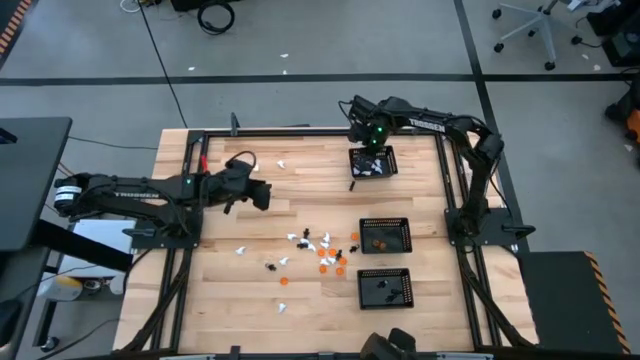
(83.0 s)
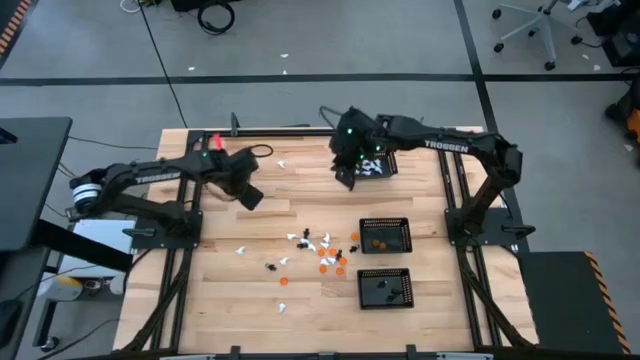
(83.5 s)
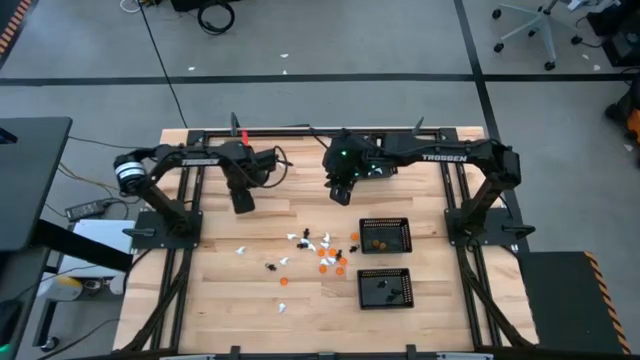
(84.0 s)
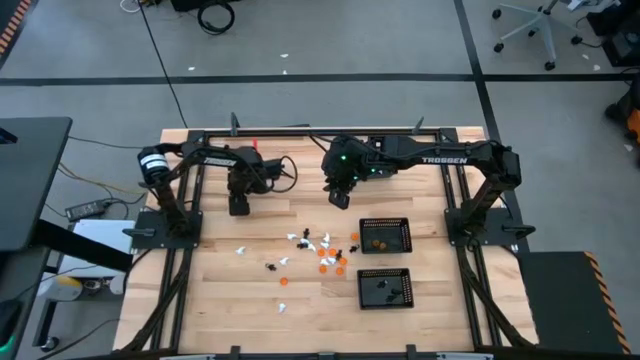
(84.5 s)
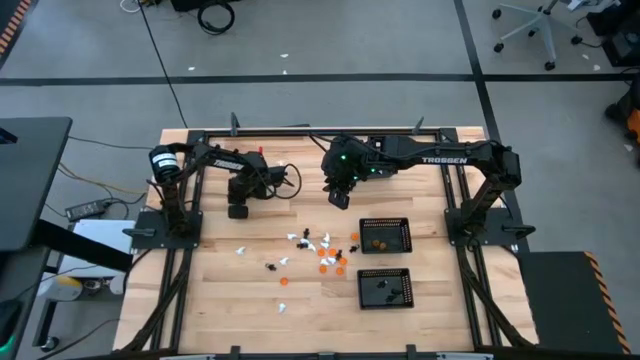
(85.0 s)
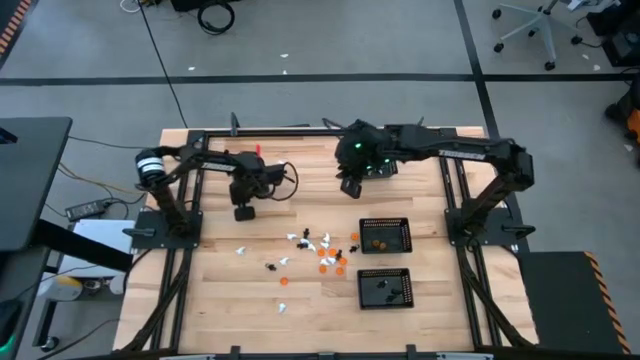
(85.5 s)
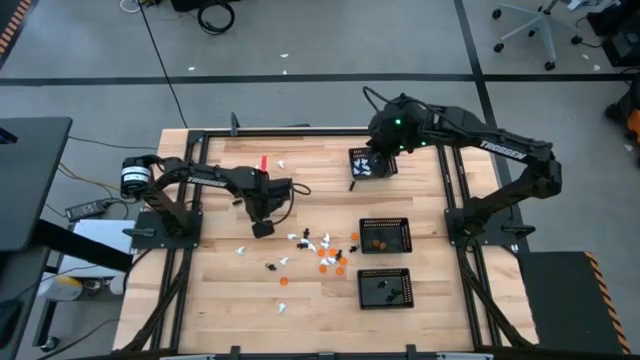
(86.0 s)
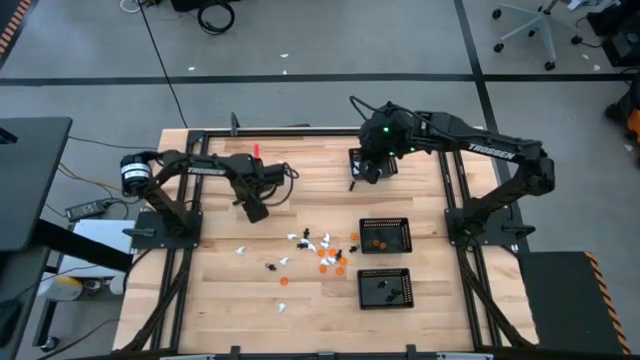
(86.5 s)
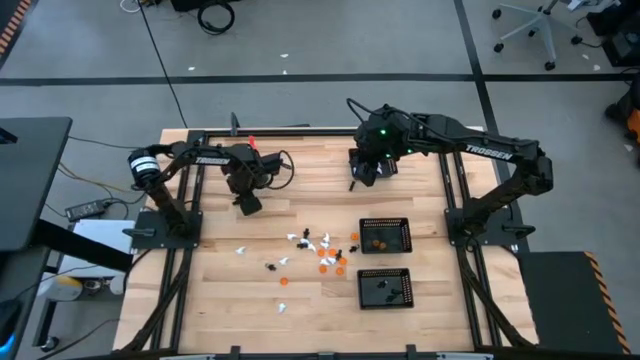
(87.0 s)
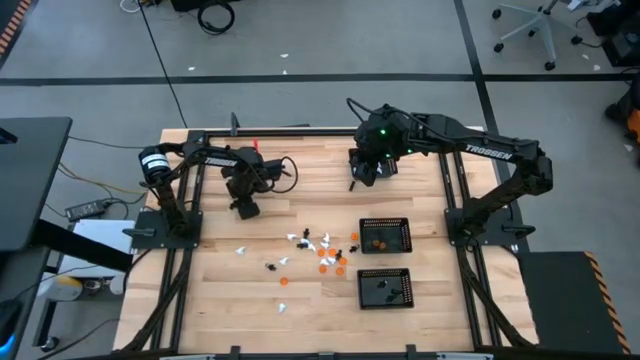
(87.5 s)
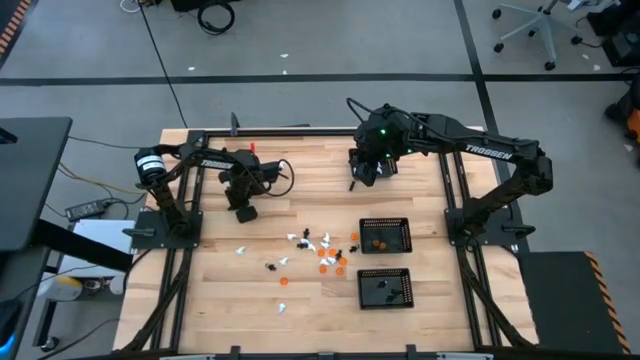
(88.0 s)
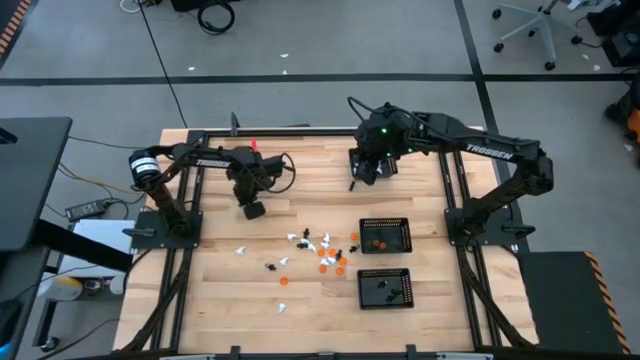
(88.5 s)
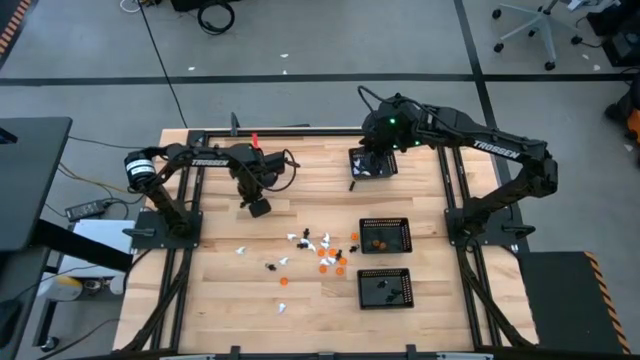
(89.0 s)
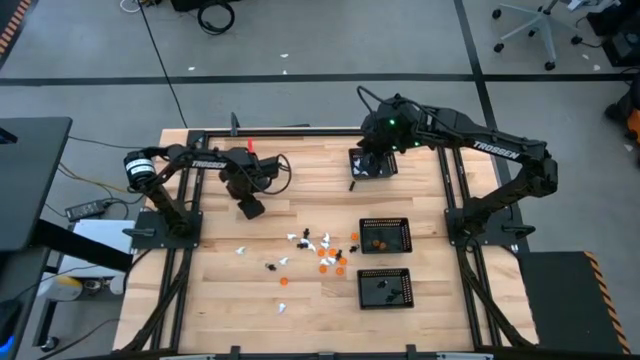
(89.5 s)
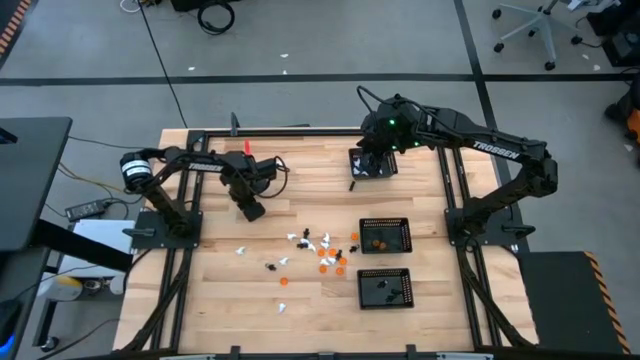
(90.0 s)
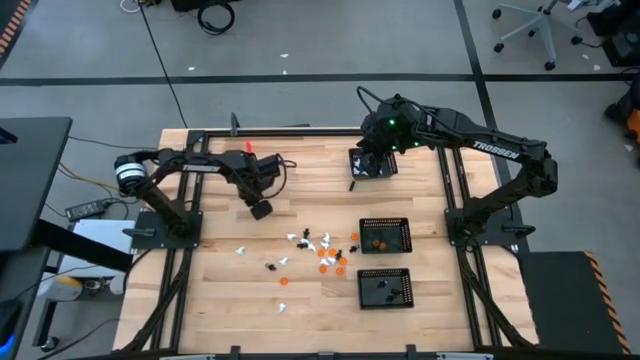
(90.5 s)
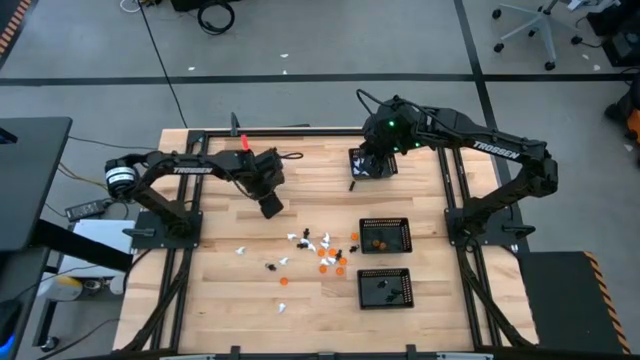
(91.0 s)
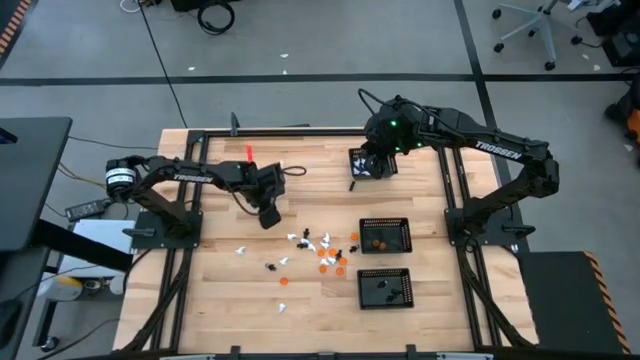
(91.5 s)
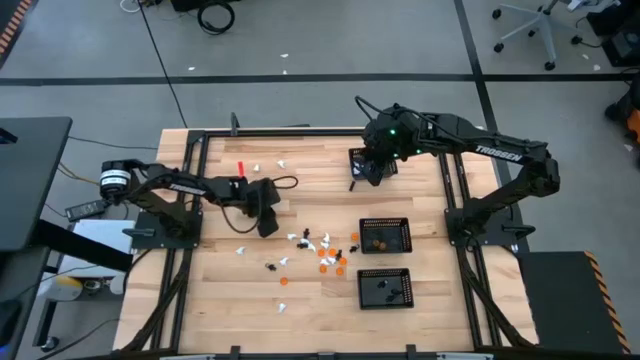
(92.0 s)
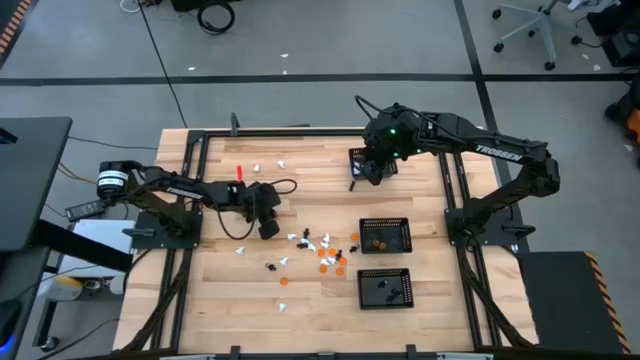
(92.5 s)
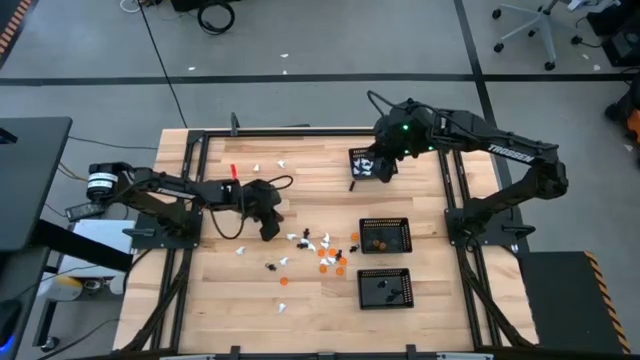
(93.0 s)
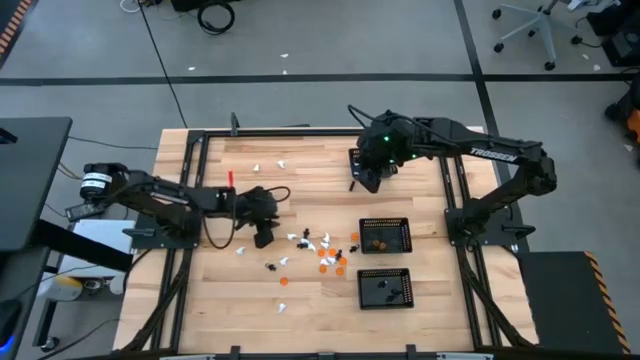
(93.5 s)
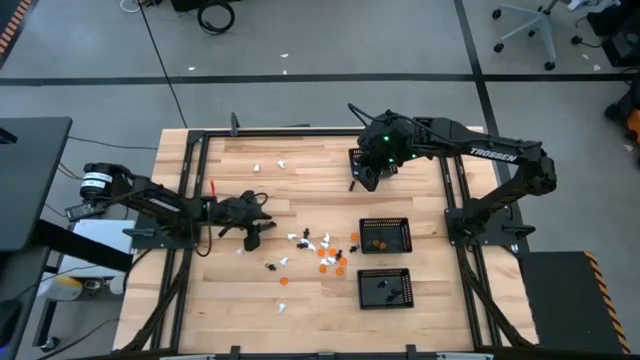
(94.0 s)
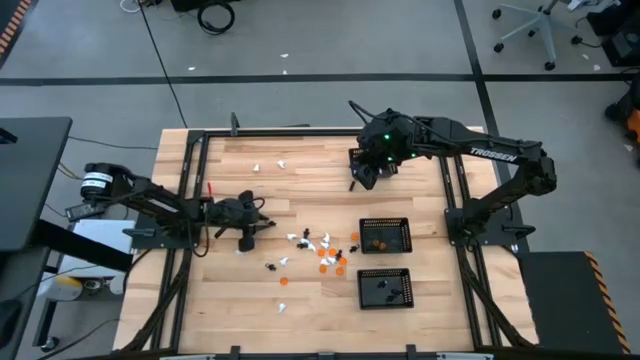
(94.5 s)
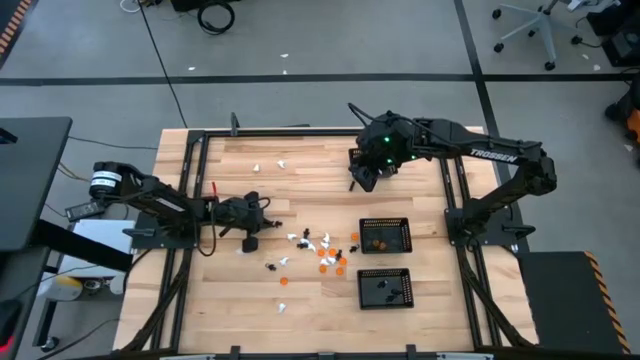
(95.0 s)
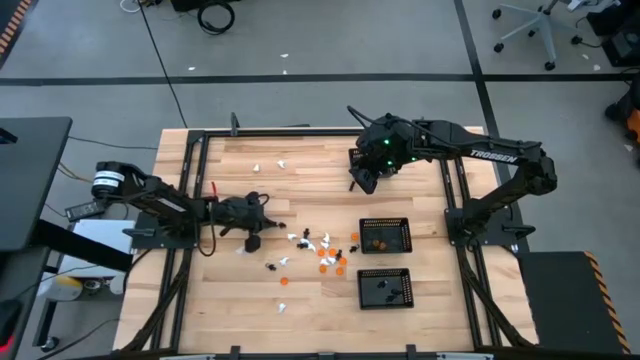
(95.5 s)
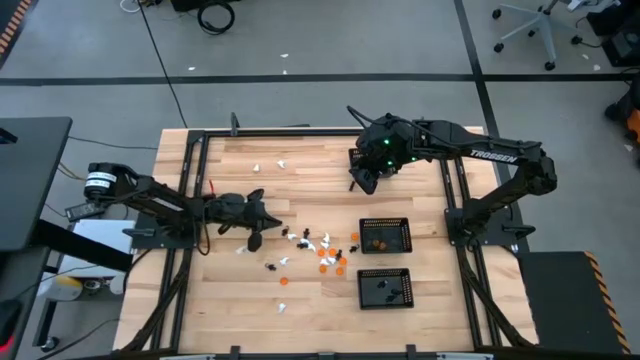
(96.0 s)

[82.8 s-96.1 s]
Task: Sort Halloween decoration
Put the black skeleton toy into the bottom black bin

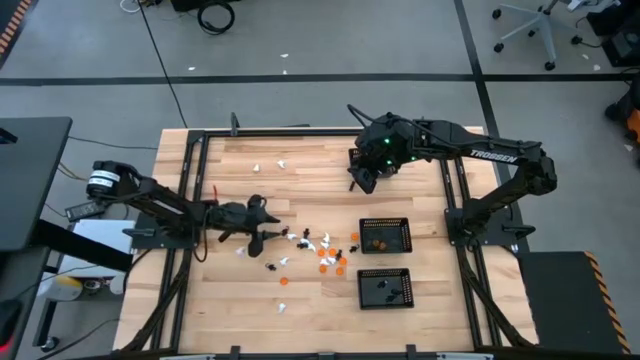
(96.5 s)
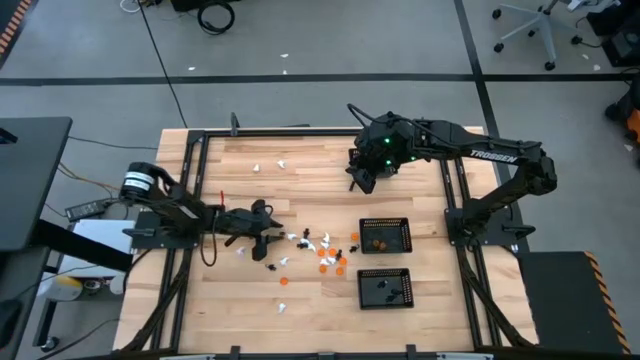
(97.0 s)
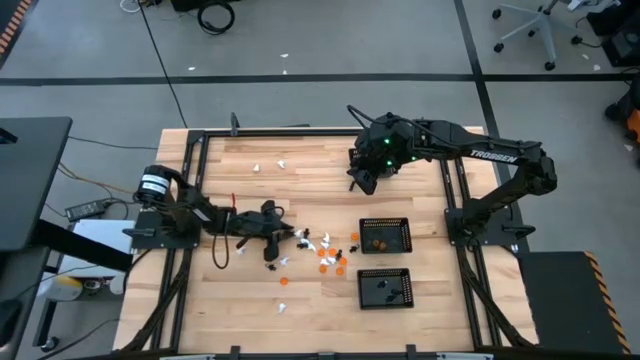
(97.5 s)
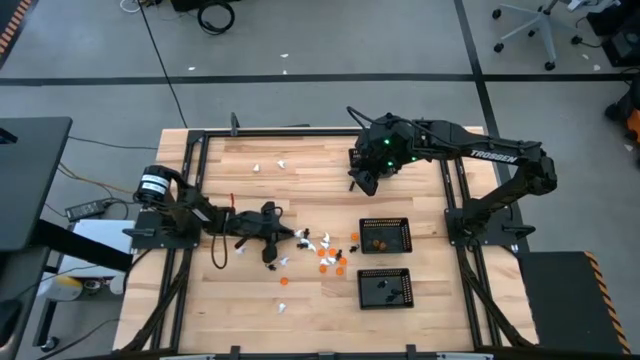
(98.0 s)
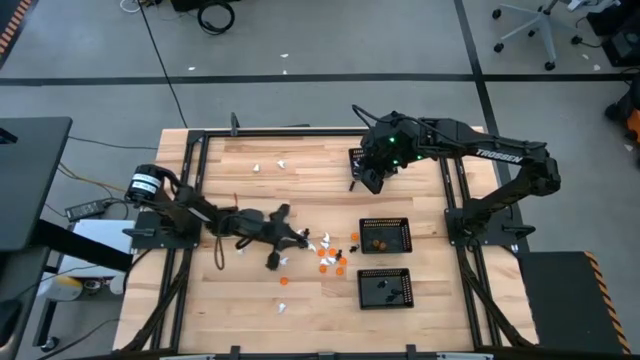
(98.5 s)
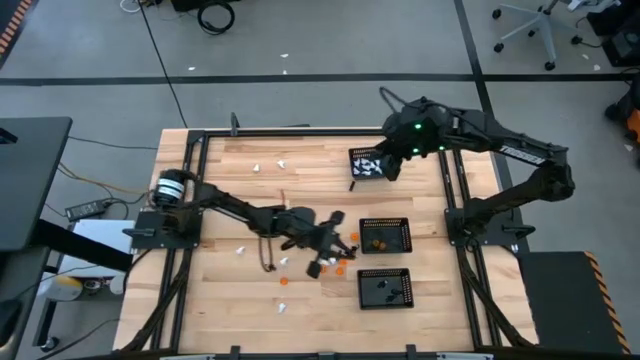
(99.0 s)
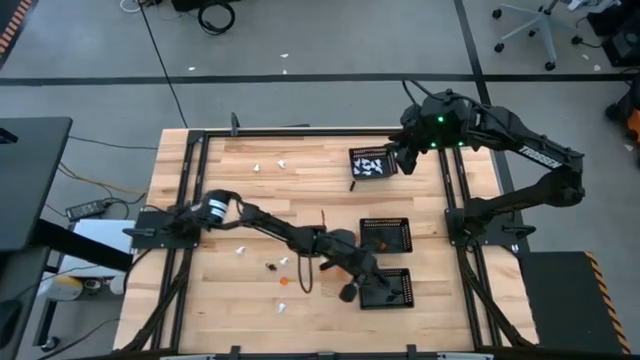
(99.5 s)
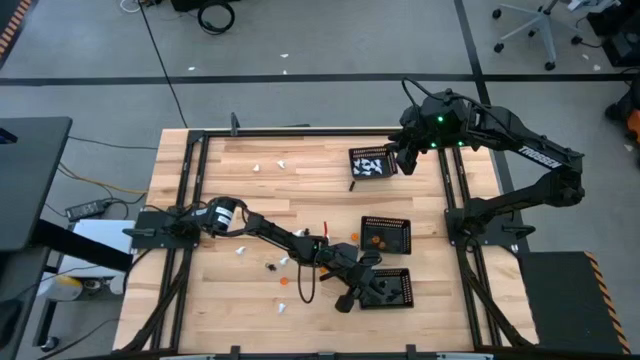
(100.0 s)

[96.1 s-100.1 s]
Put the black skeleton toy into the bottom black bin

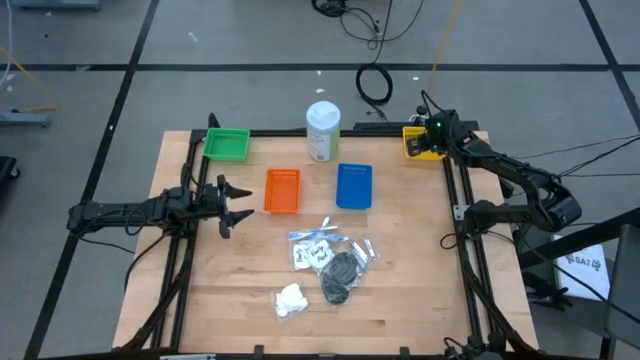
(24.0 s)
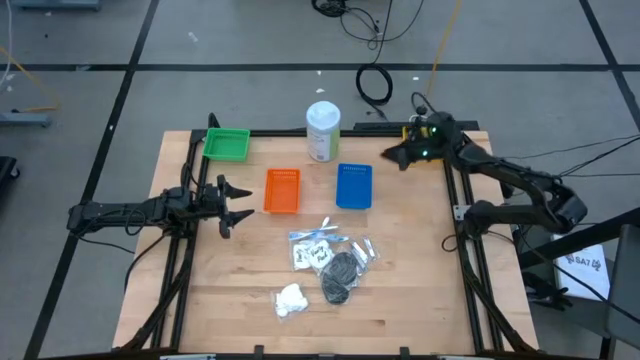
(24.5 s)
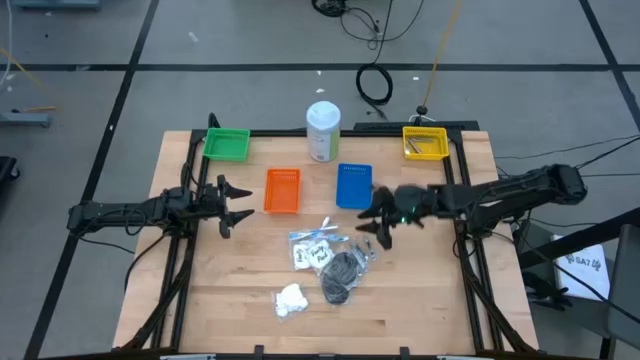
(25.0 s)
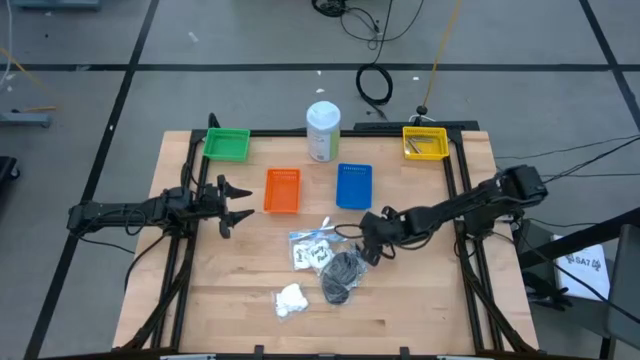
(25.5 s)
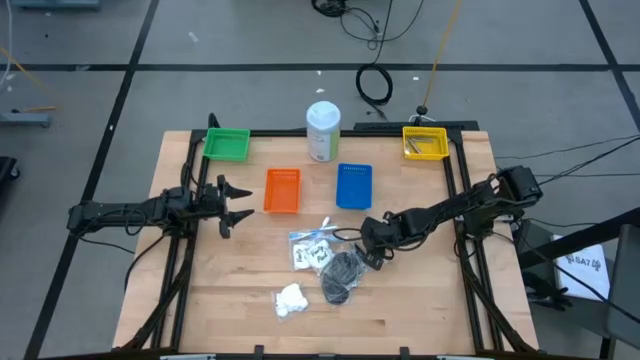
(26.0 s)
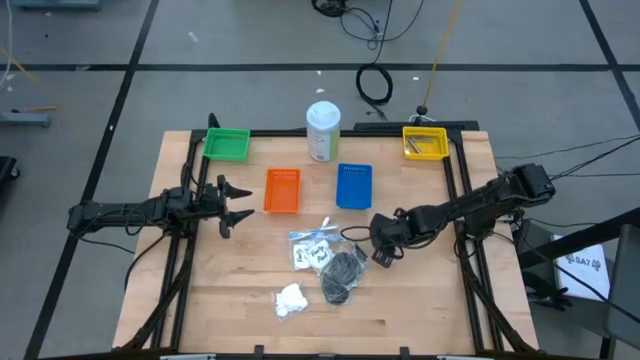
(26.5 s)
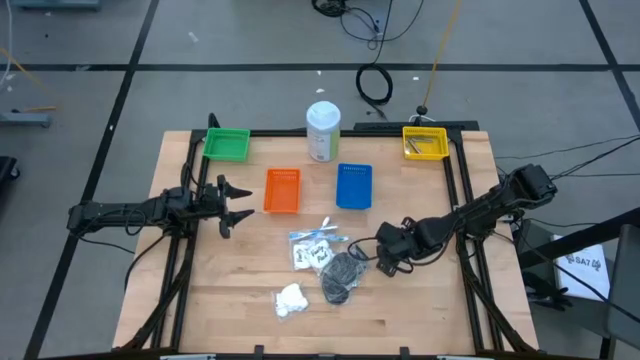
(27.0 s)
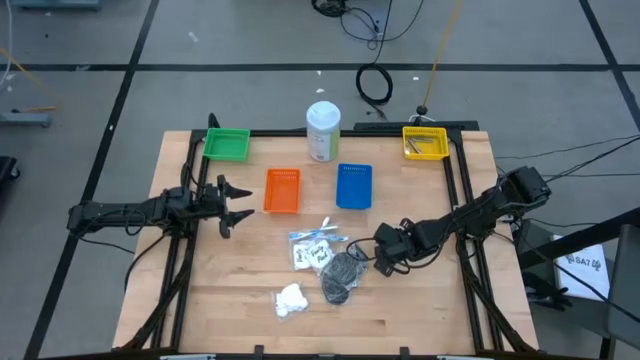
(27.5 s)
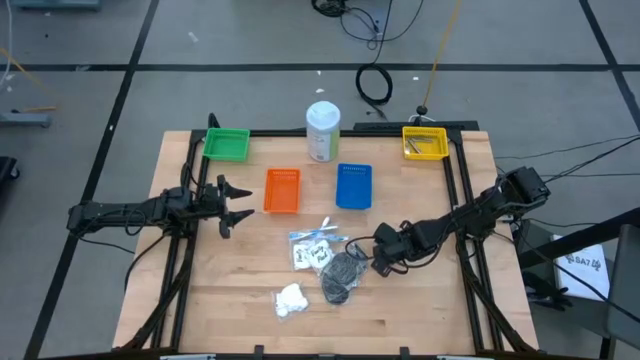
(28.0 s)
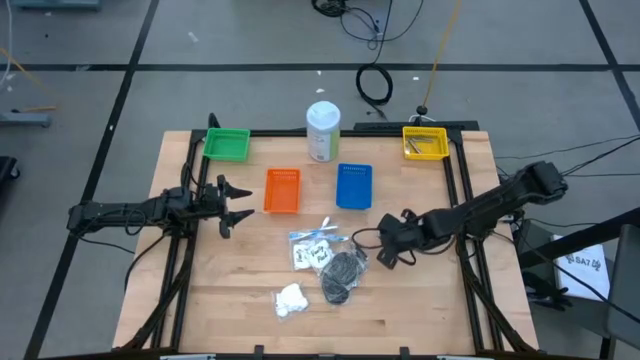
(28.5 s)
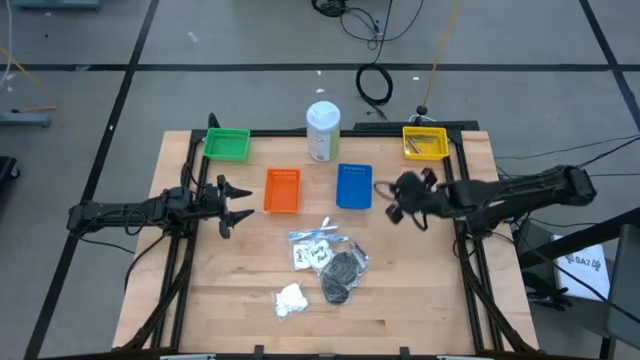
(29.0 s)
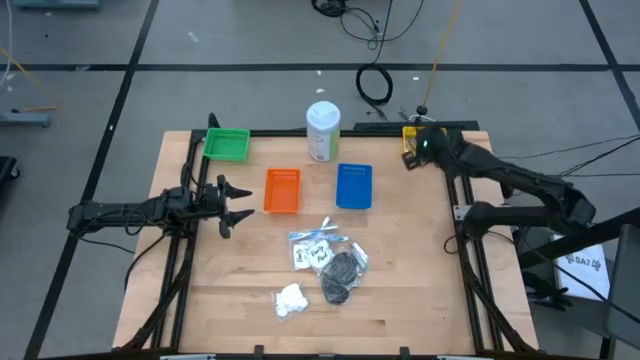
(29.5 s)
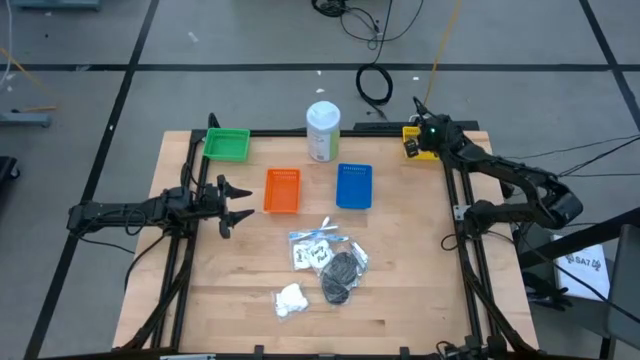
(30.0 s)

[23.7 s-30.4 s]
Task: Pick & Place Travel size toiletries
Put the nail cutter into the yellow bin
